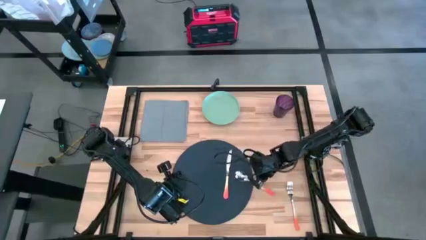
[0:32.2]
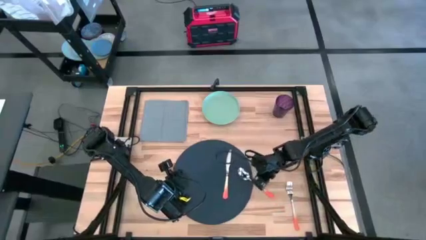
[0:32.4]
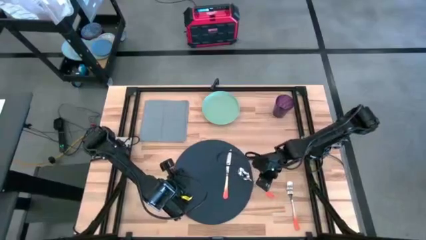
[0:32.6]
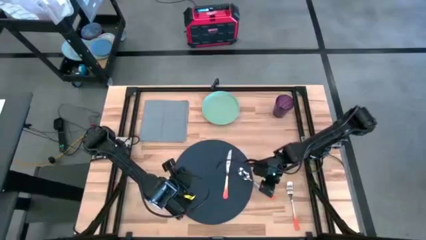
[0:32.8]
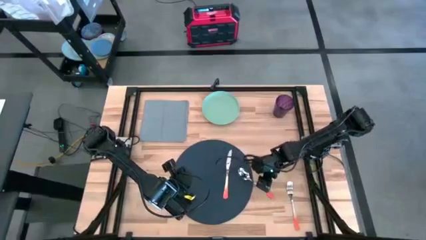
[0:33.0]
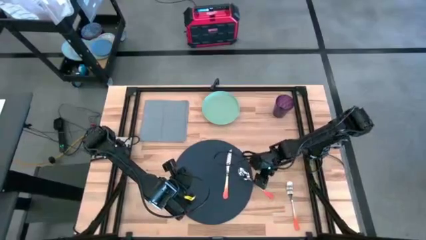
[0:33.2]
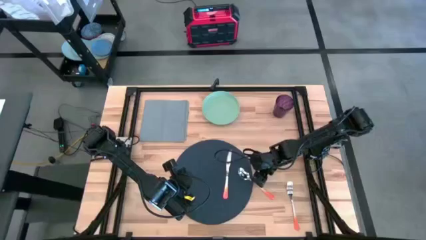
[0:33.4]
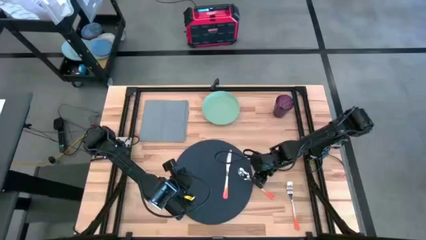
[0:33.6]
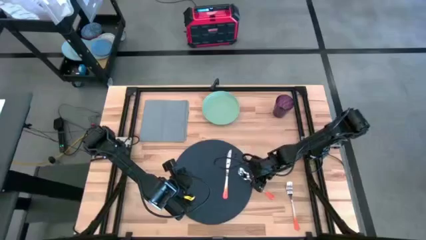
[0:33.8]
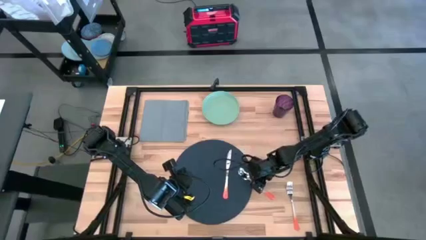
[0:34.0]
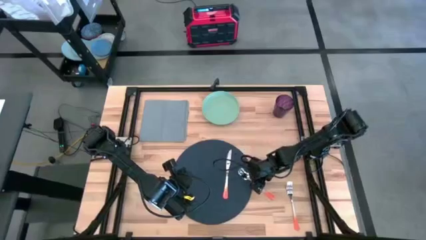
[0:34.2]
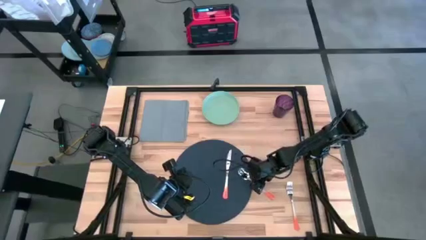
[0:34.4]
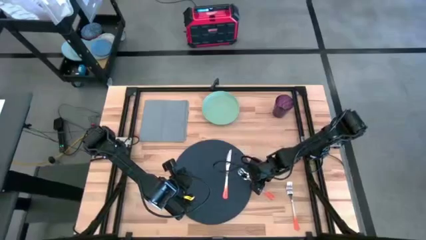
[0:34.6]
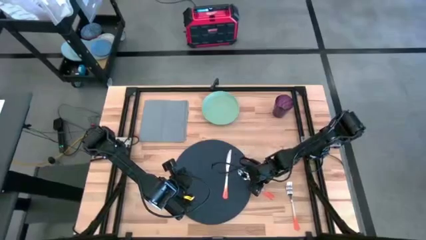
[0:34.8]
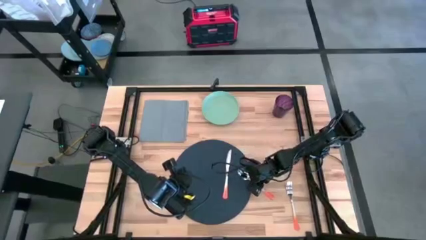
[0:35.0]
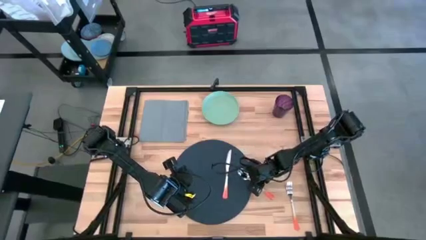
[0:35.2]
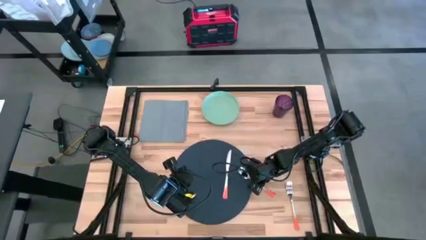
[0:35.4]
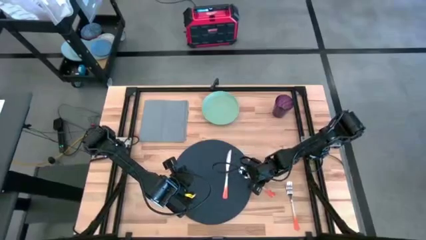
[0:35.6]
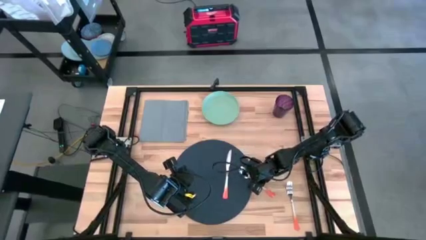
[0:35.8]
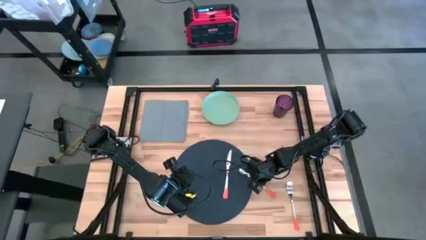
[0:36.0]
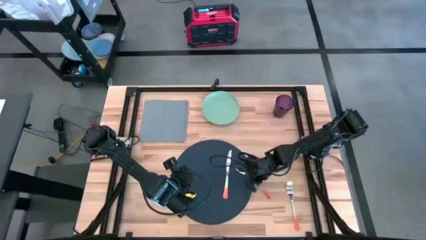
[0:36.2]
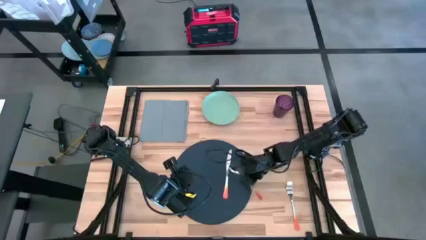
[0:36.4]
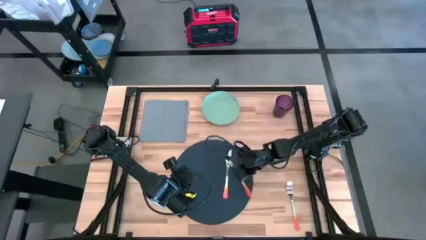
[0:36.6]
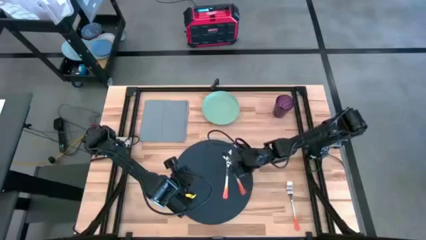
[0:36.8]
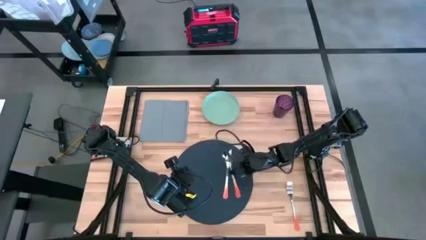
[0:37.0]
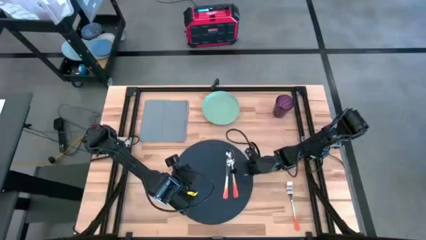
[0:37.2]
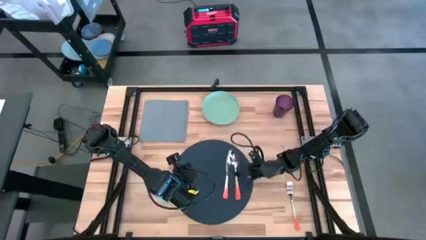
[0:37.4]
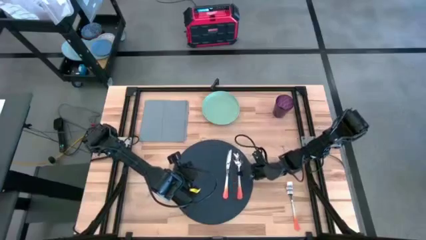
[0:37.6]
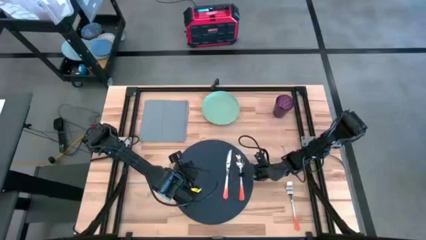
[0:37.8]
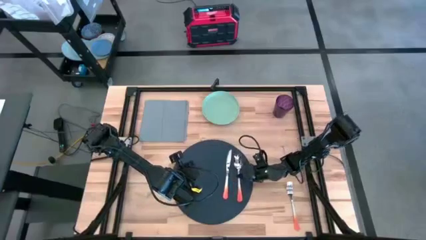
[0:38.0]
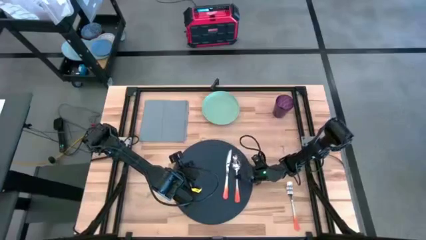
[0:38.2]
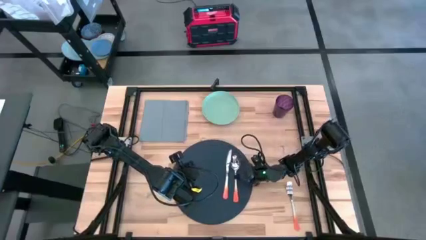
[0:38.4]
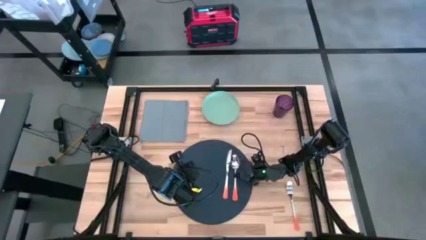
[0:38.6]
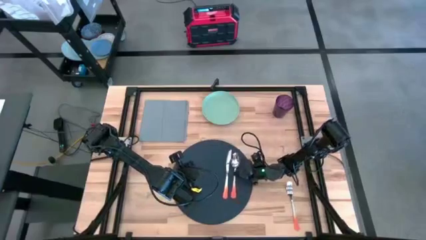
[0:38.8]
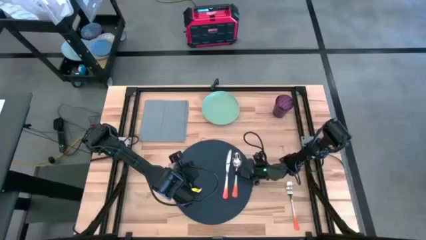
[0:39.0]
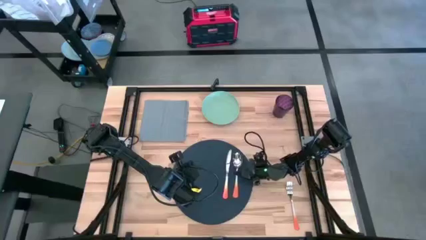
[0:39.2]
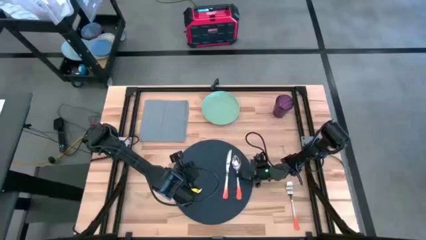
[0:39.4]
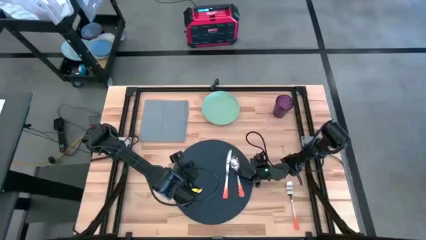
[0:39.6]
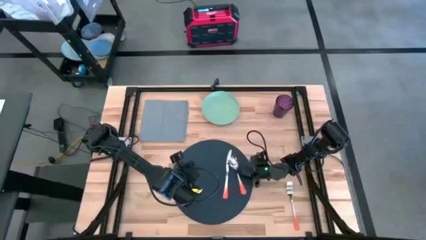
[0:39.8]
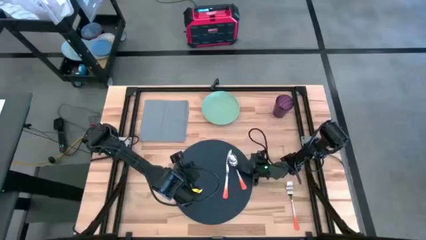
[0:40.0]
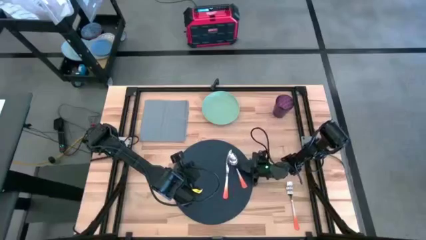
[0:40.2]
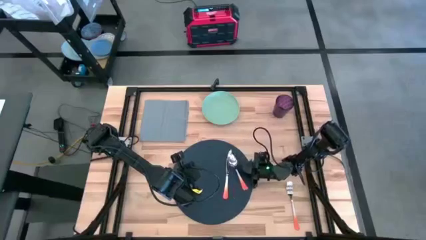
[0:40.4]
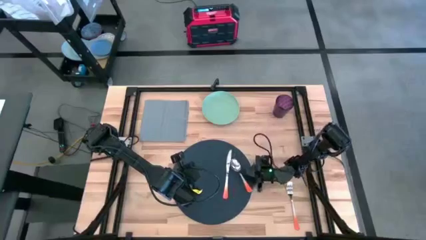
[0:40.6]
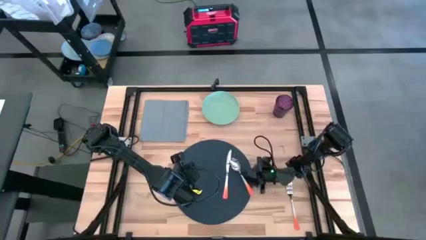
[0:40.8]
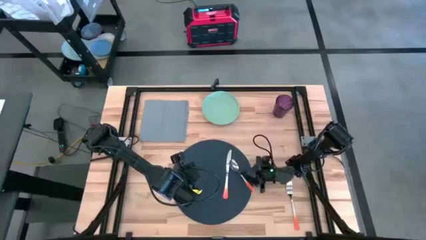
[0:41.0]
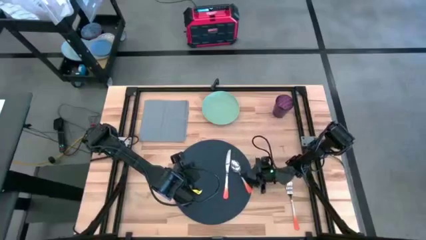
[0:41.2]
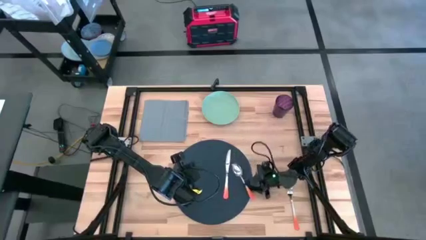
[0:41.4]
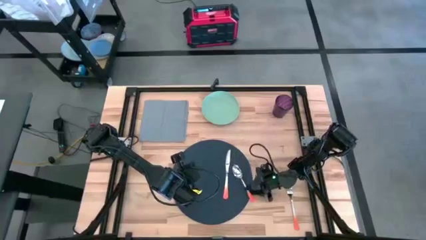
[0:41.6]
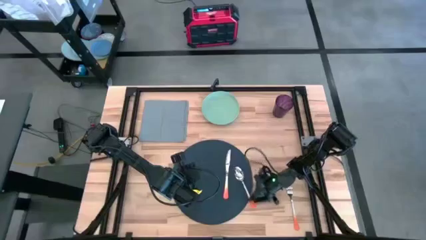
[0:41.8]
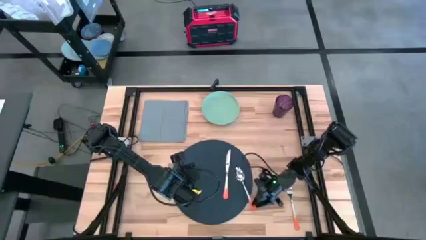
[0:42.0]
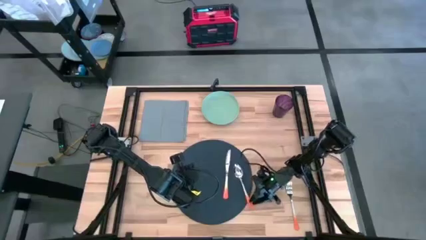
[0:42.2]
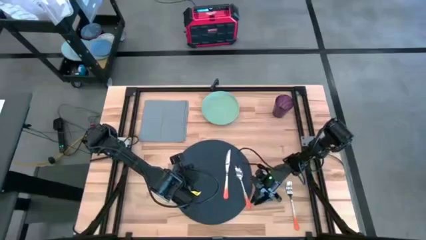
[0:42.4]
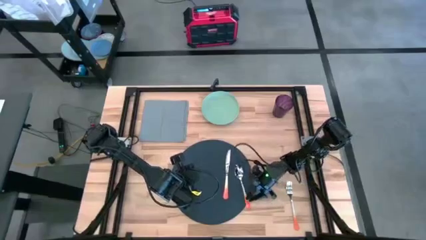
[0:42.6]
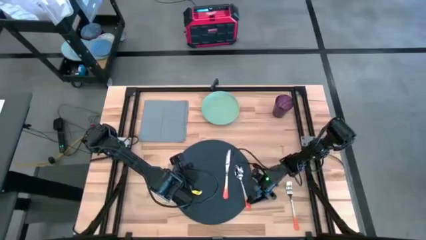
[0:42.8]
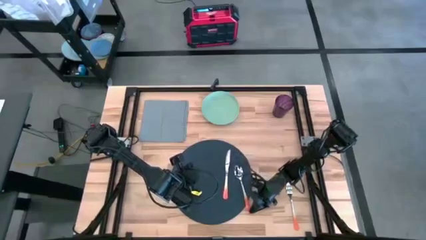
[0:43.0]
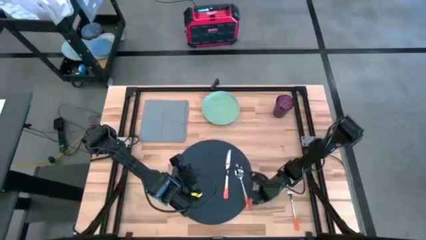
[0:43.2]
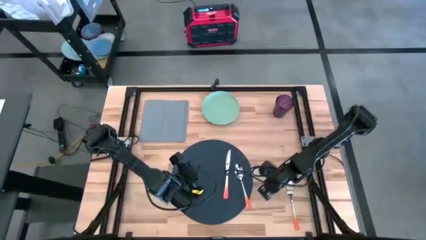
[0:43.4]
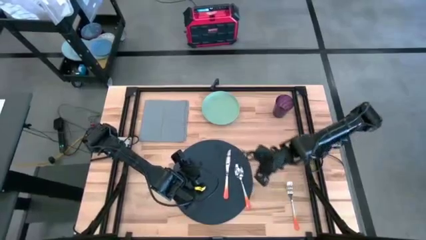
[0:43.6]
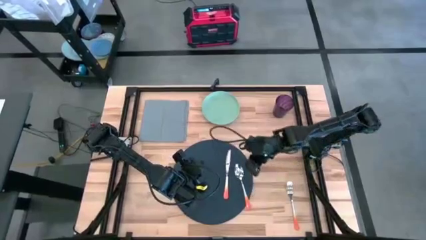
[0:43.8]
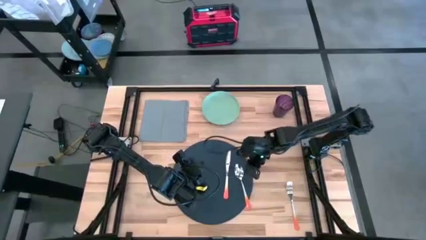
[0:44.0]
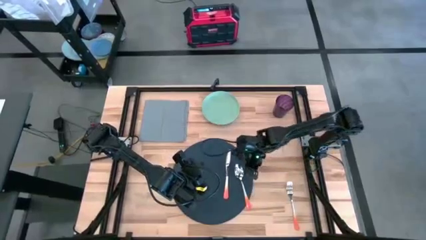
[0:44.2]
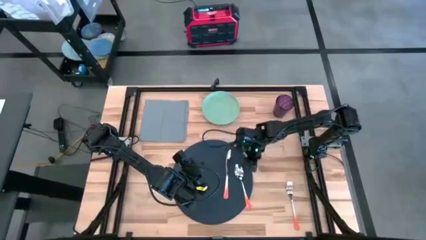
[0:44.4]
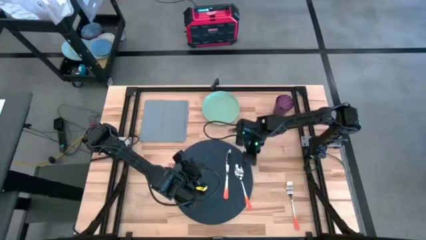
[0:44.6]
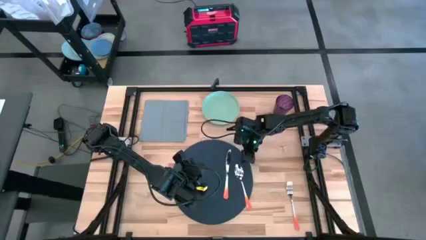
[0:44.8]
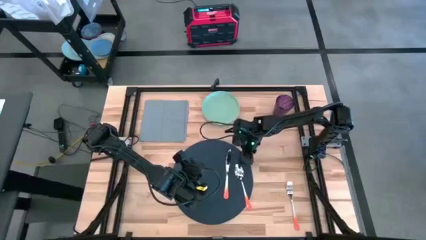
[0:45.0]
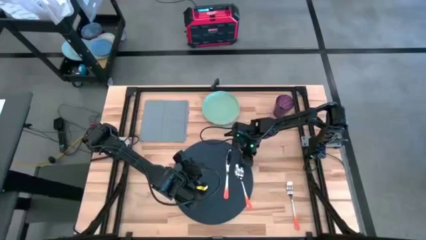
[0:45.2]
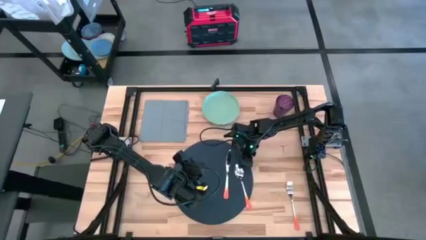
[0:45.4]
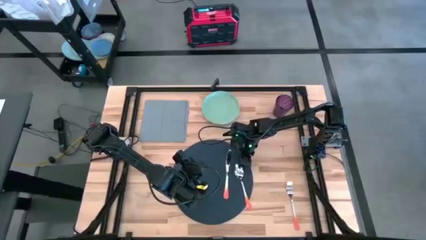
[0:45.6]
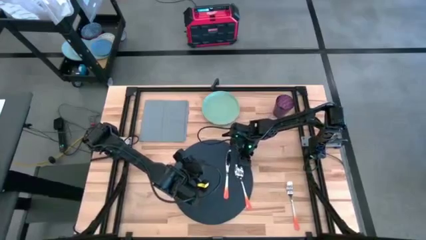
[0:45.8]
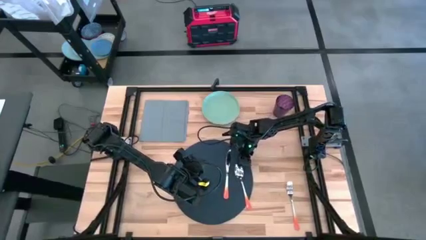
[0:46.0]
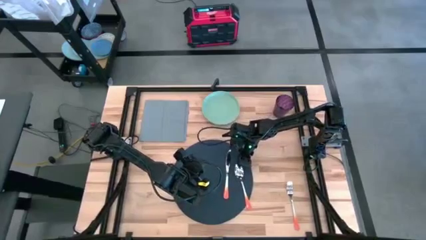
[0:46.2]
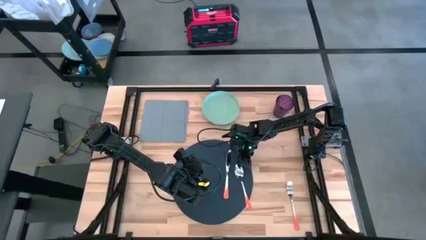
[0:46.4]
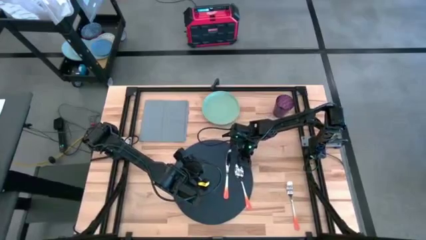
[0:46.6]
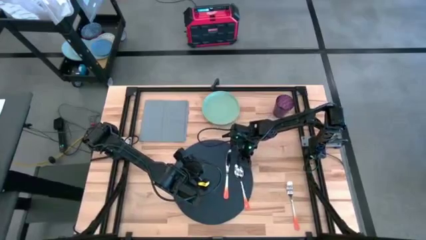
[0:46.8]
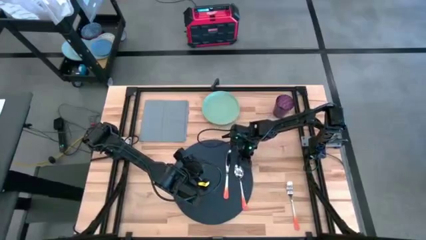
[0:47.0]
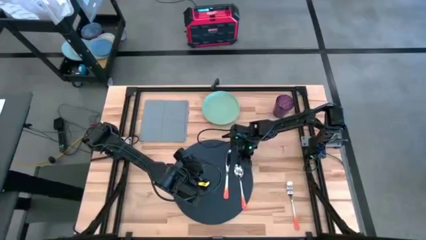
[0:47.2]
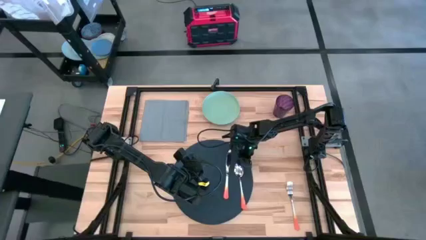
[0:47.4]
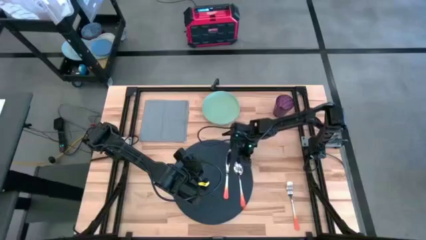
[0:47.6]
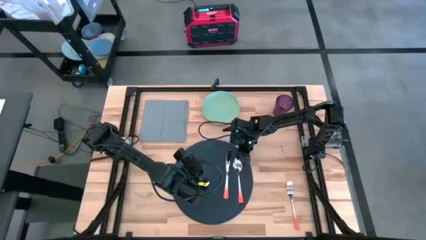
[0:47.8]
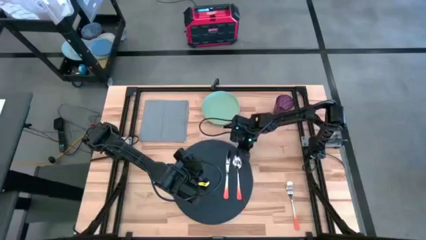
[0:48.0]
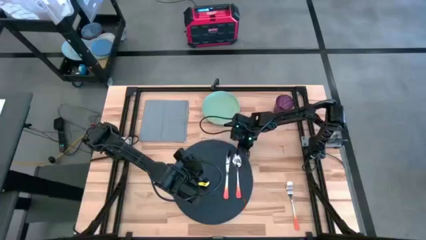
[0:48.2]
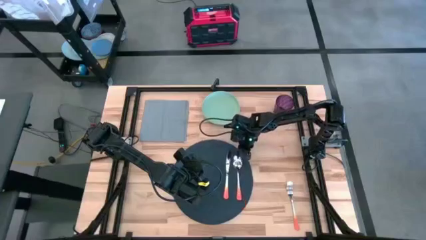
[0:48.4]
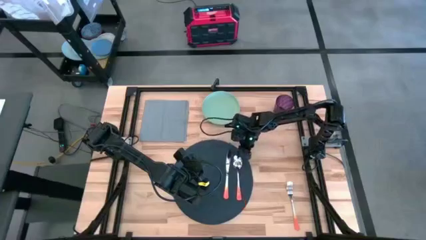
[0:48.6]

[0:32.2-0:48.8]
Task: Set table place
Put the orange spoon on the dark gray placemat to the right of the orange table knife
